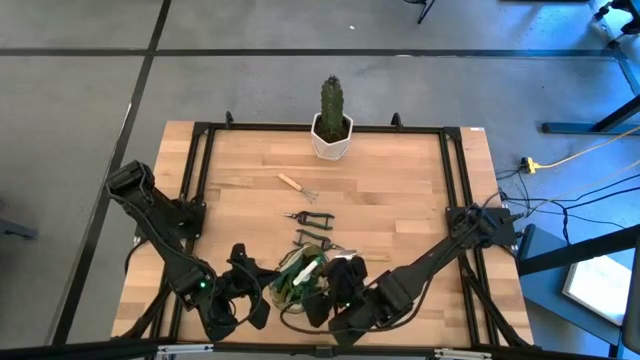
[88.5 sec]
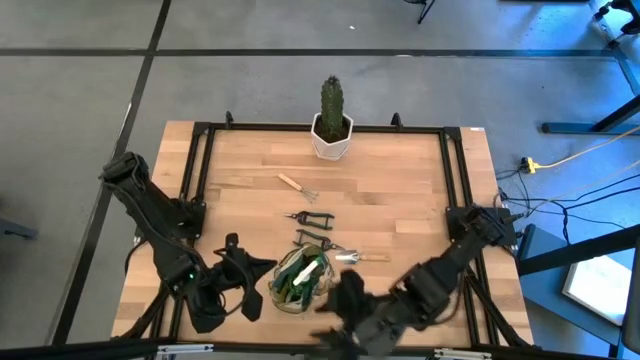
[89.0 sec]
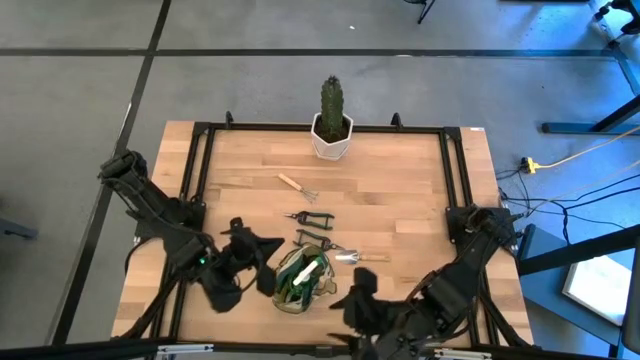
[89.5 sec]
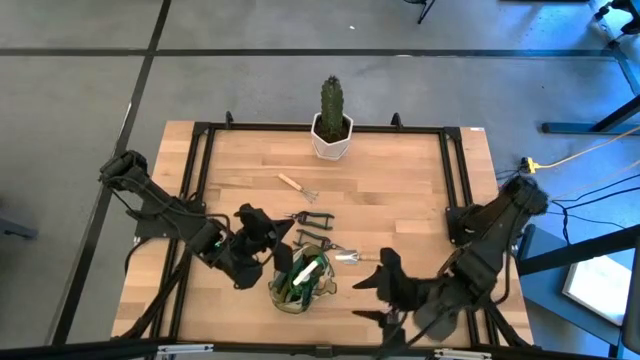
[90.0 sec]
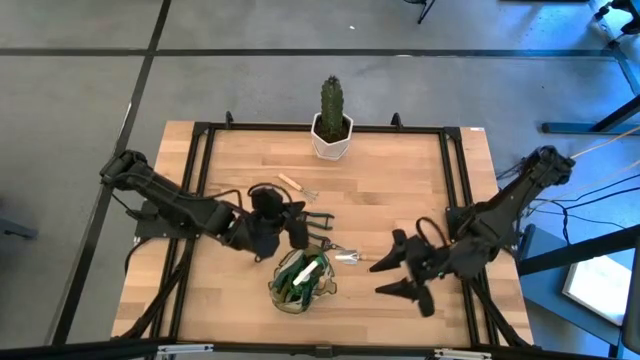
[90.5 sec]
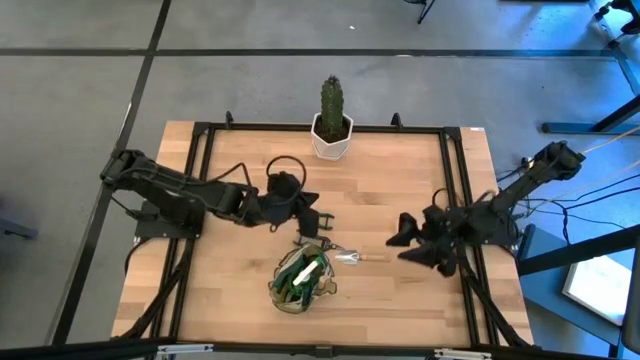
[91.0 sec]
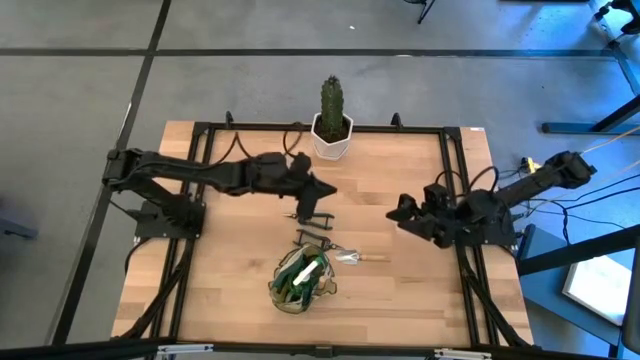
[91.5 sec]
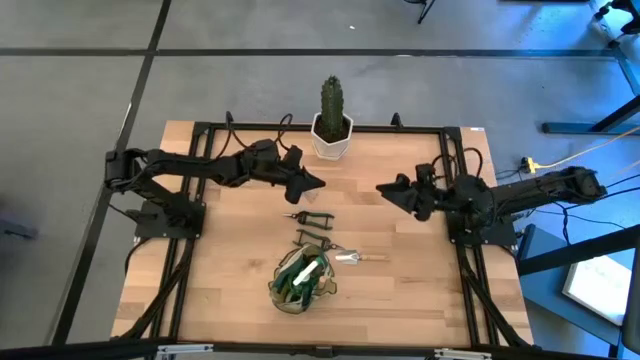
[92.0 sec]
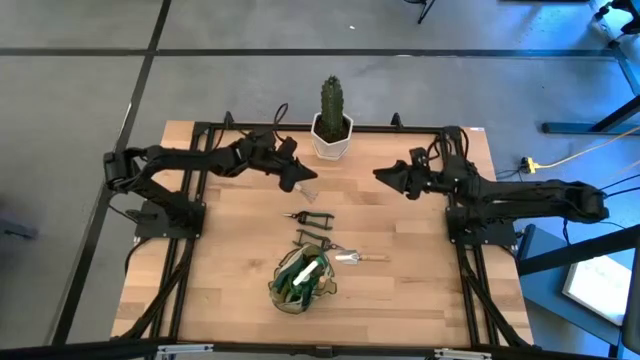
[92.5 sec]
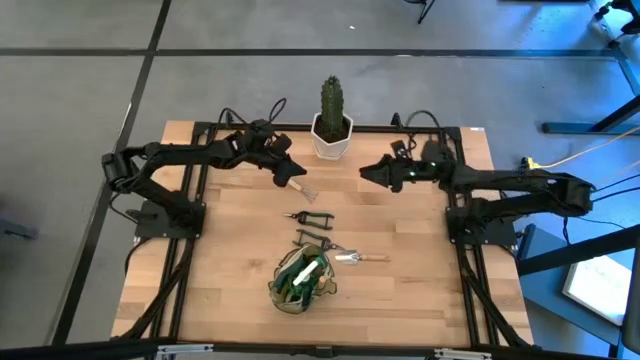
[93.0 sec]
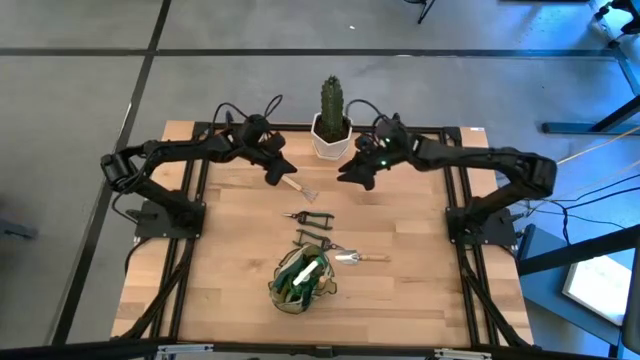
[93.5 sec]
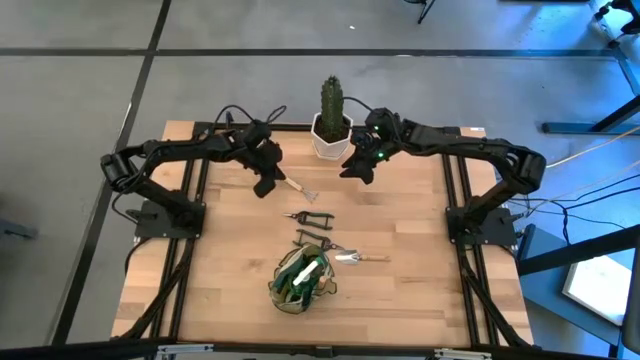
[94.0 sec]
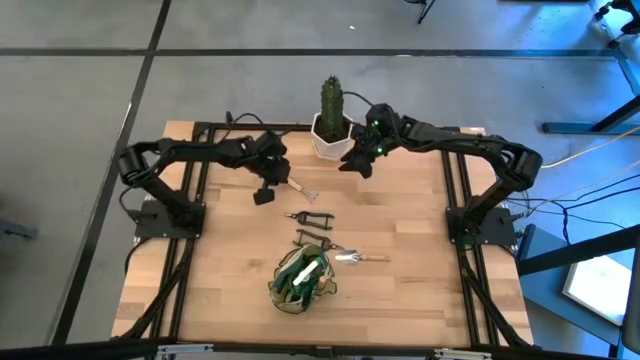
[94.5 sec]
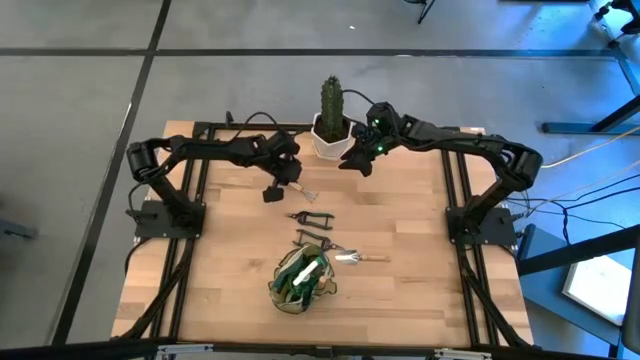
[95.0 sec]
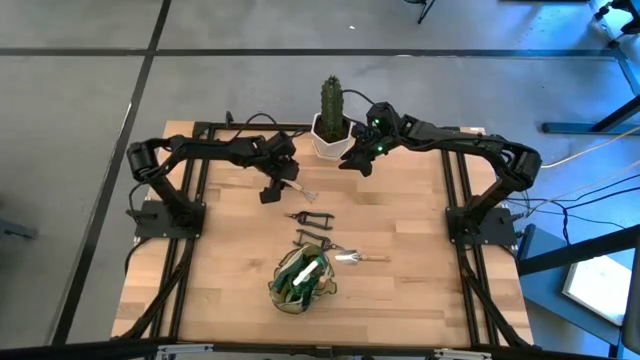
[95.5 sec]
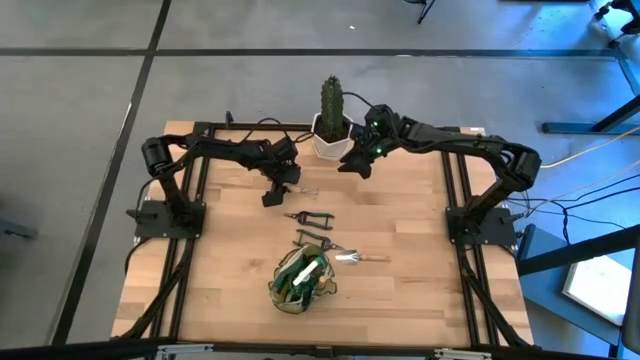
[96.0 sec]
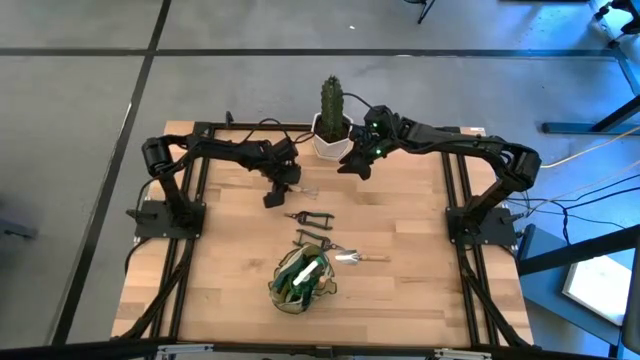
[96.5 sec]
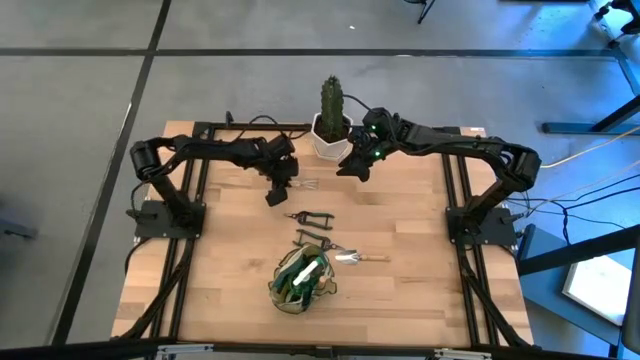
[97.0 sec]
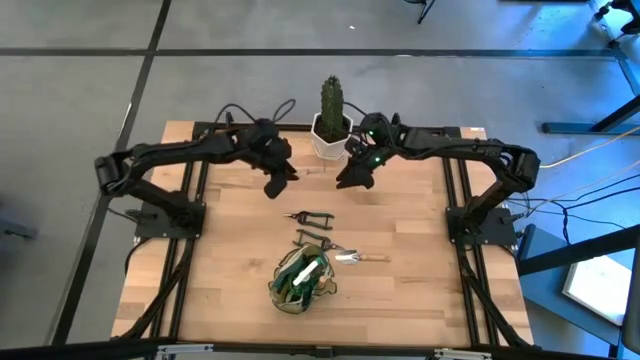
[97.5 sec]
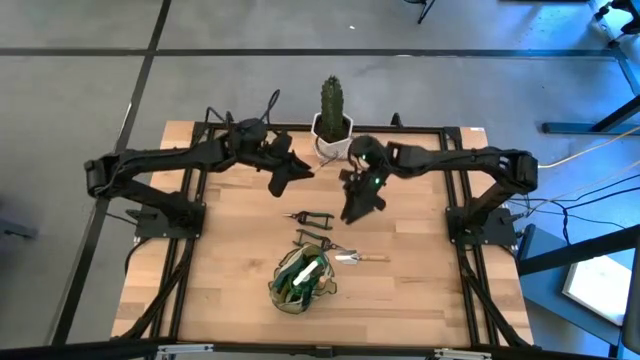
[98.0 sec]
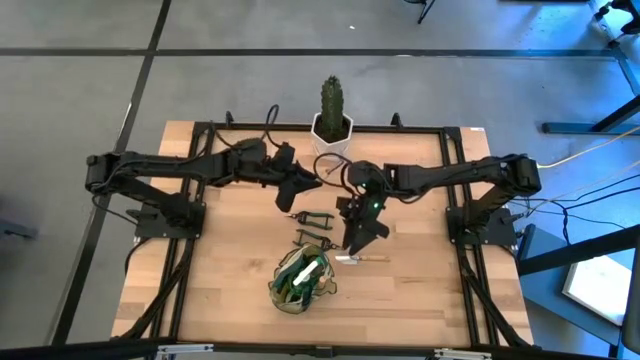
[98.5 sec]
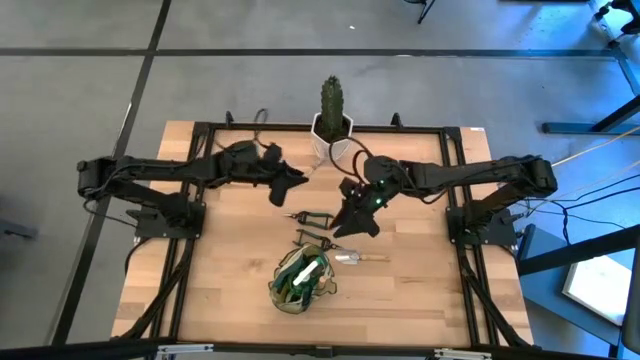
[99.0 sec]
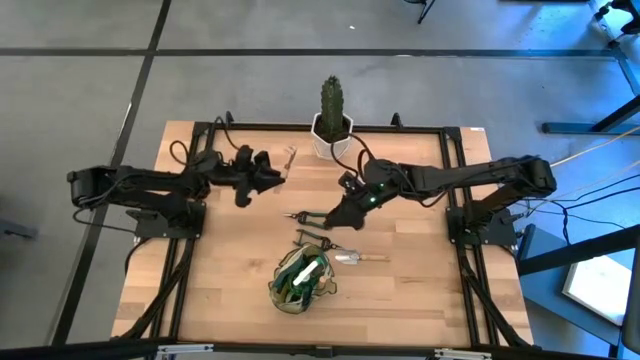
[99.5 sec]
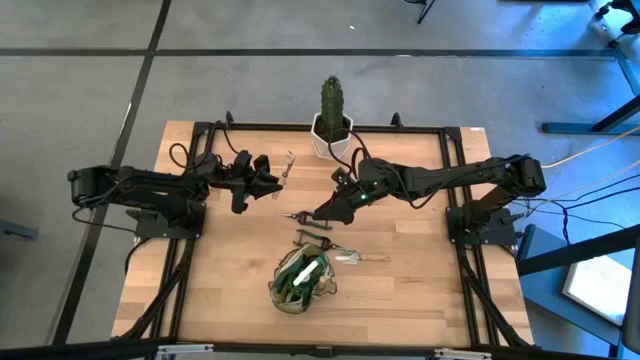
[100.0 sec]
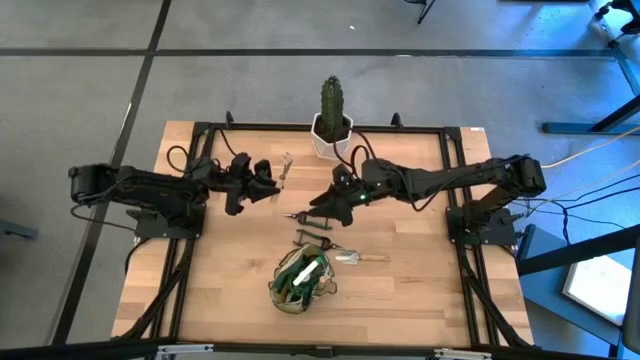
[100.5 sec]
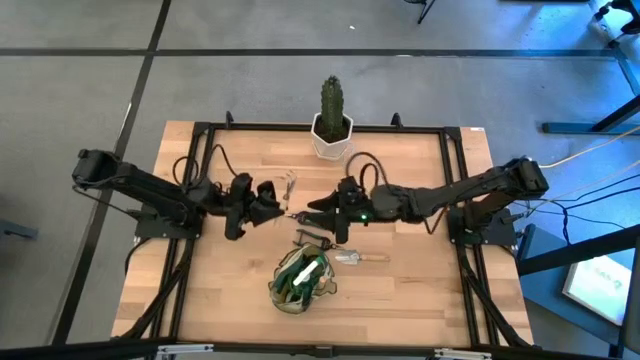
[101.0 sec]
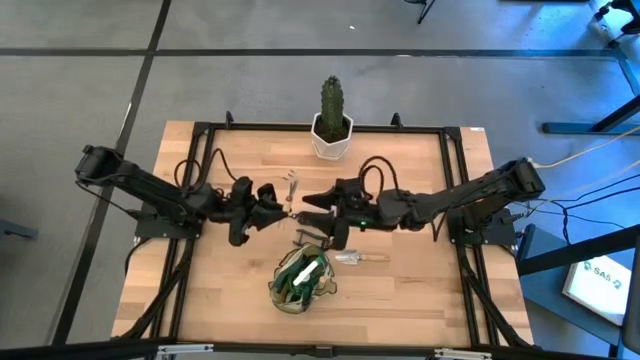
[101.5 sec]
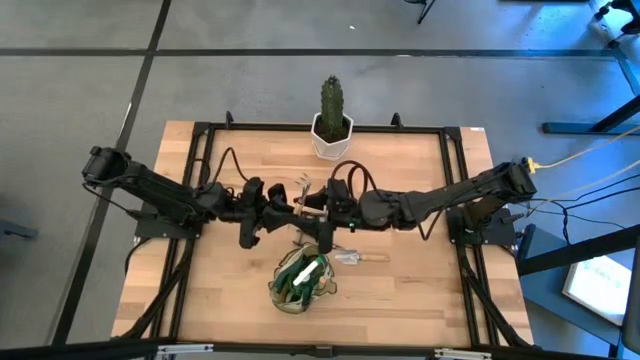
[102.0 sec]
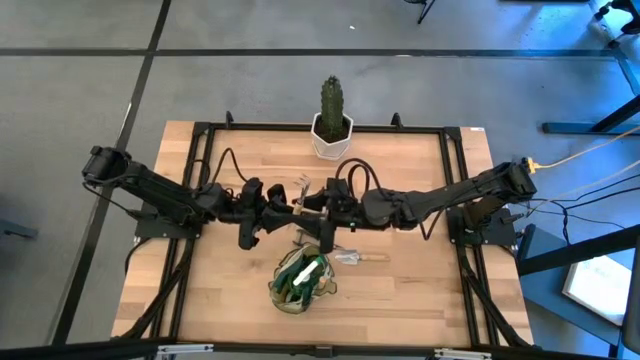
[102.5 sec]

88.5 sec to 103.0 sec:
Task: Pick & Place Garden tools in Gardening bag
Put the hand rake into the gardening bag

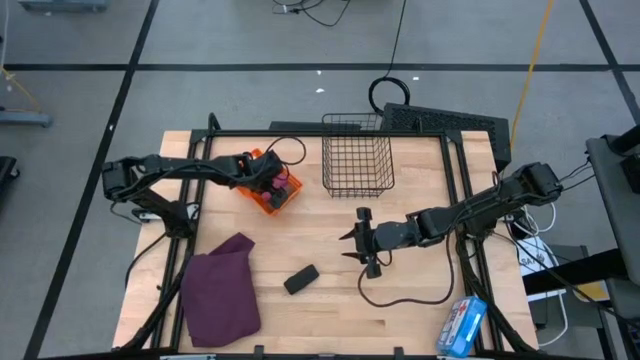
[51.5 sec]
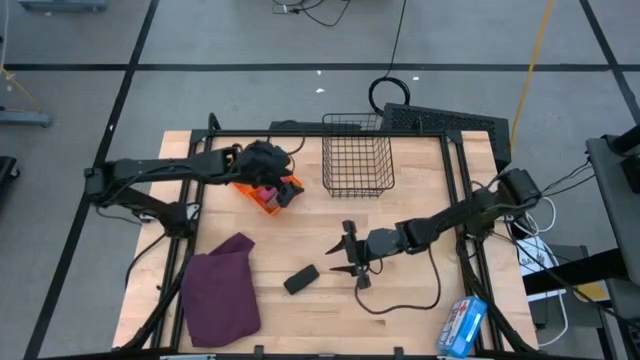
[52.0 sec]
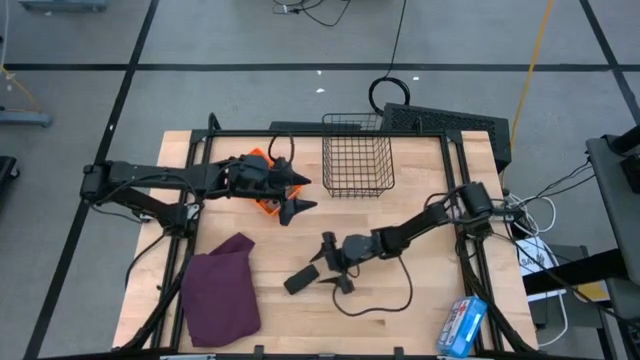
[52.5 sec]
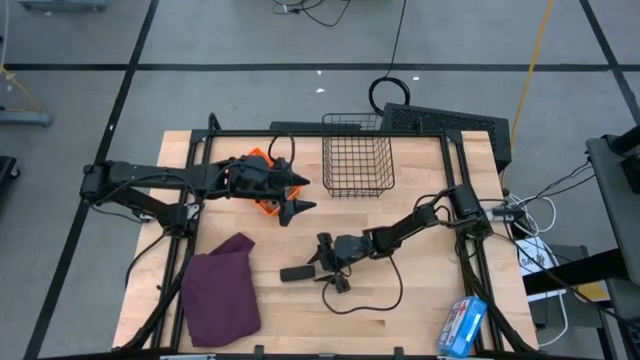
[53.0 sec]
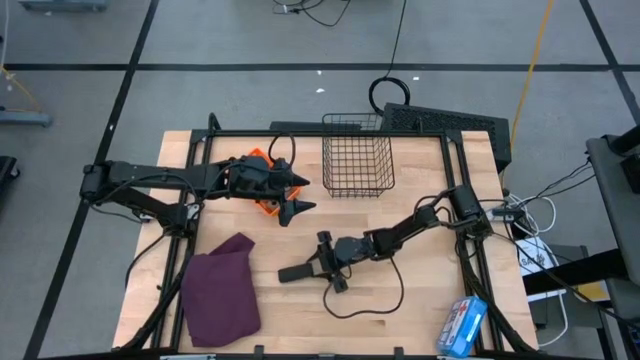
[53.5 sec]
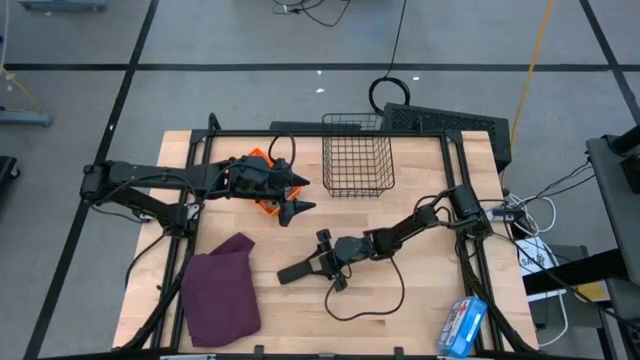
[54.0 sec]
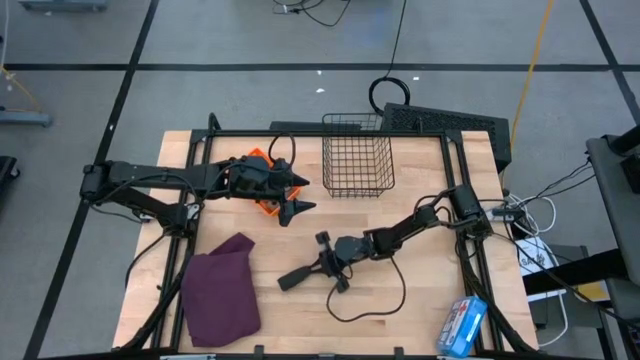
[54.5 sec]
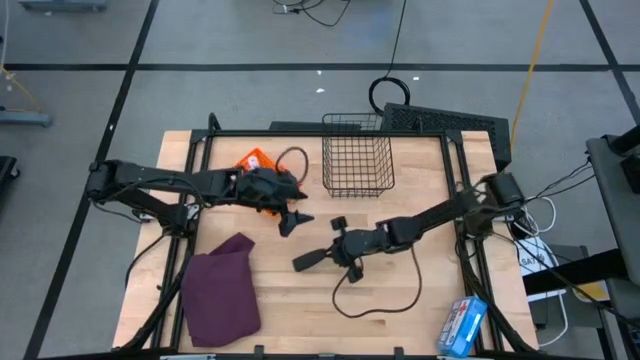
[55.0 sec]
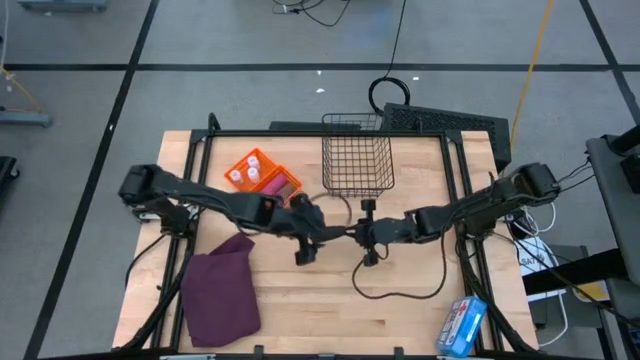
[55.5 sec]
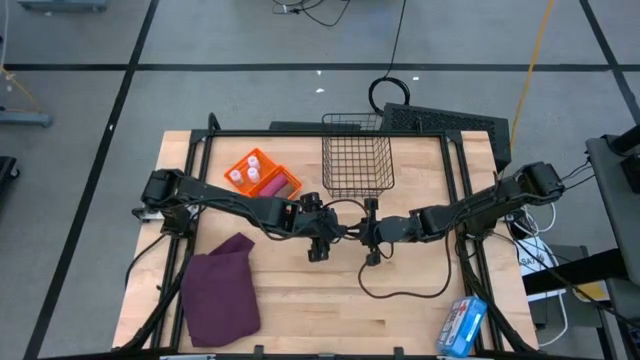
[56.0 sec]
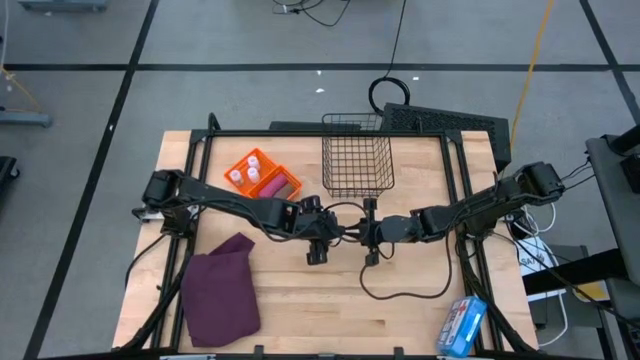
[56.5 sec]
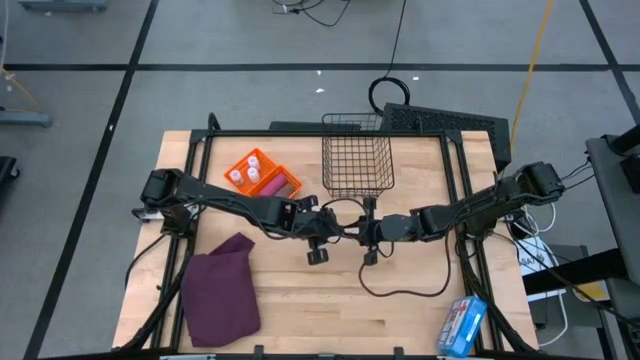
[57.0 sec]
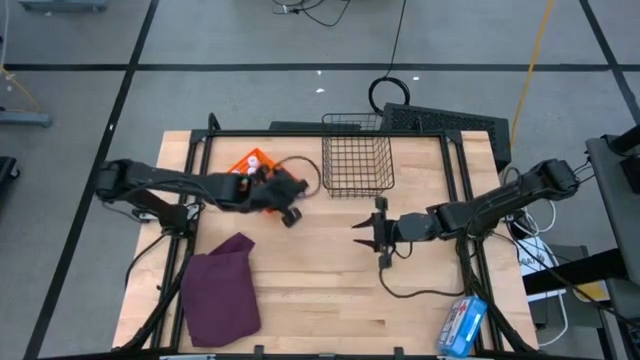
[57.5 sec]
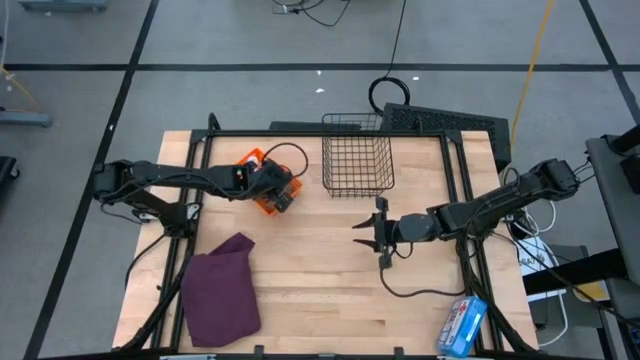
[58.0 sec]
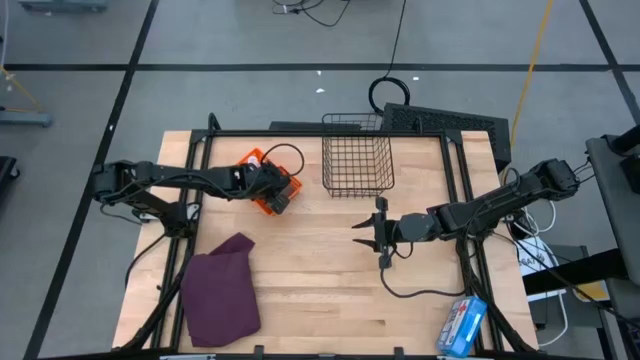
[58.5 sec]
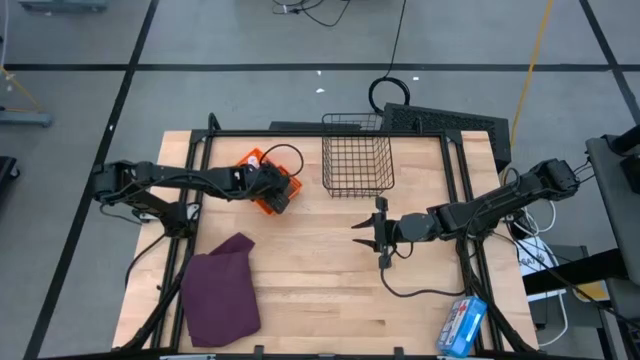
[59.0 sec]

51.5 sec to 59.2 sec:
Task: Pick & Place Medicine items
Put the black bandage into the bottom orange basket
